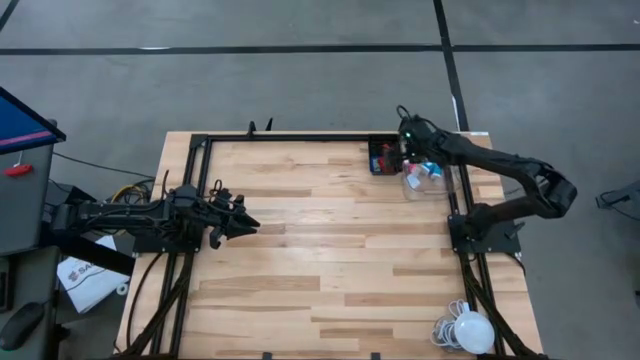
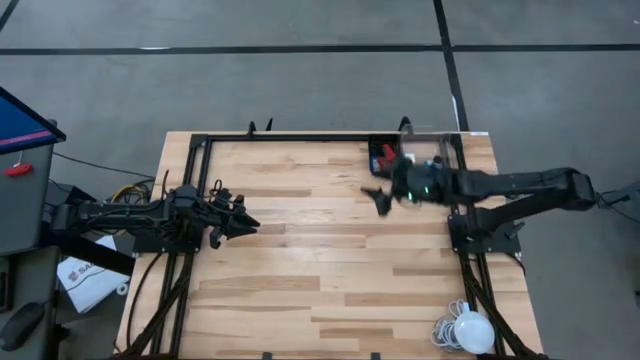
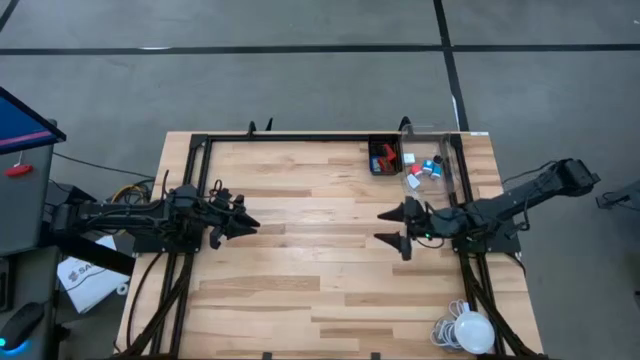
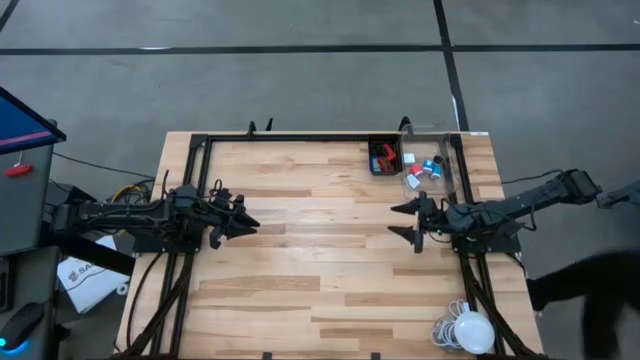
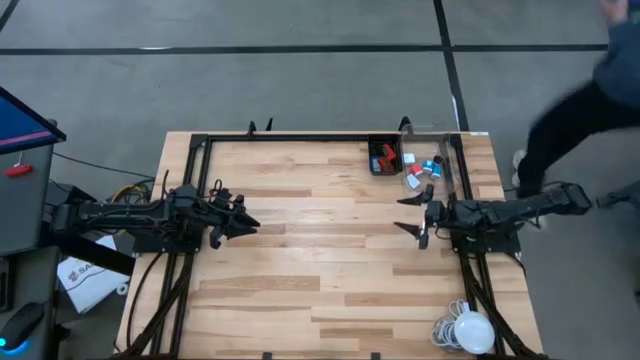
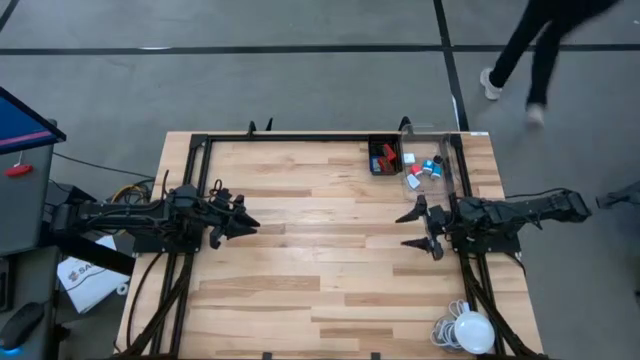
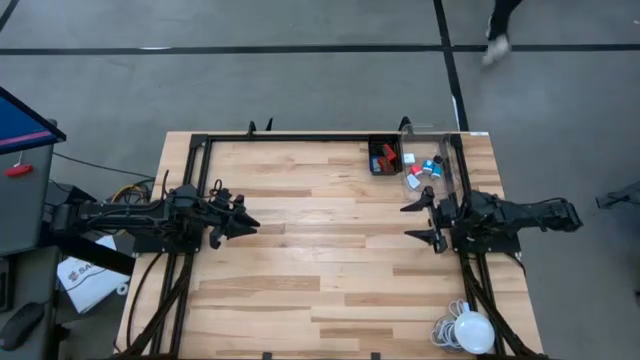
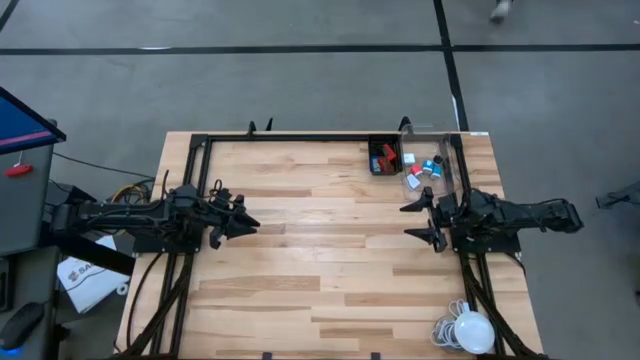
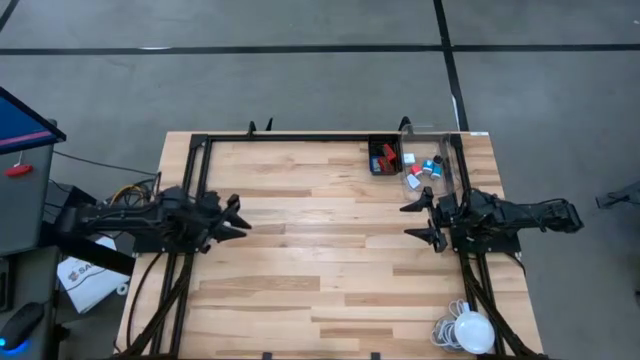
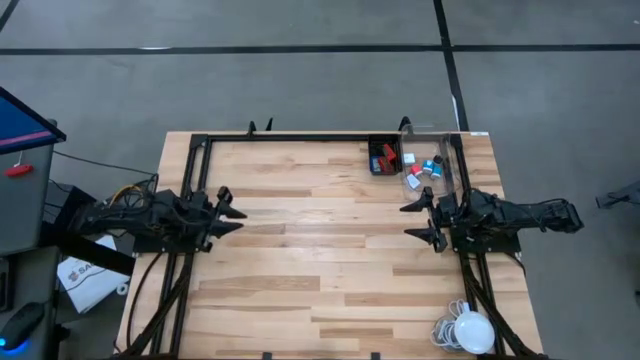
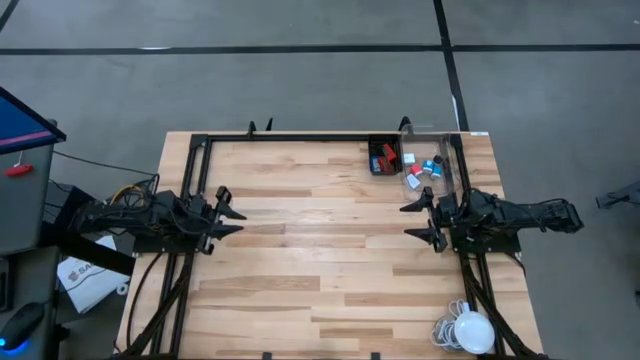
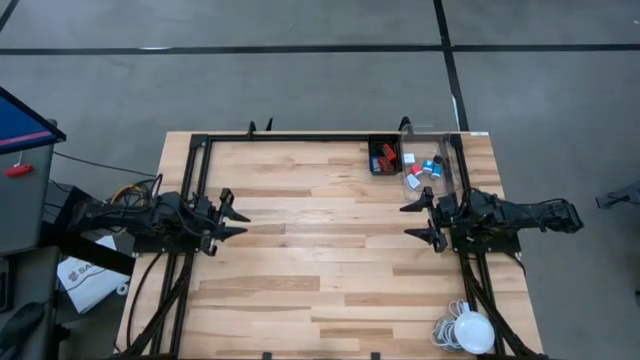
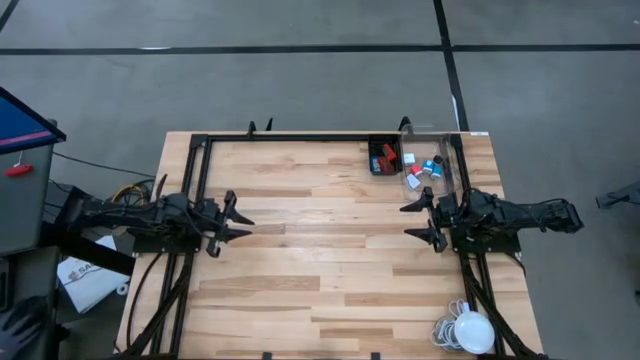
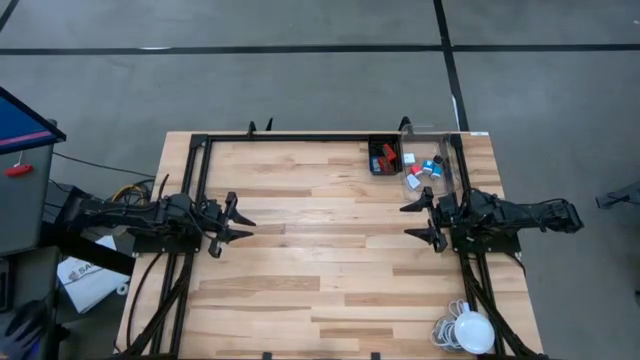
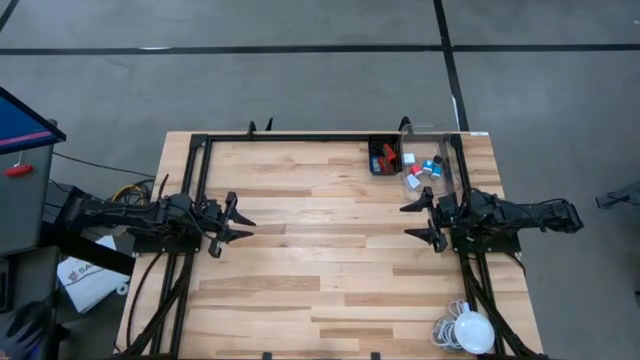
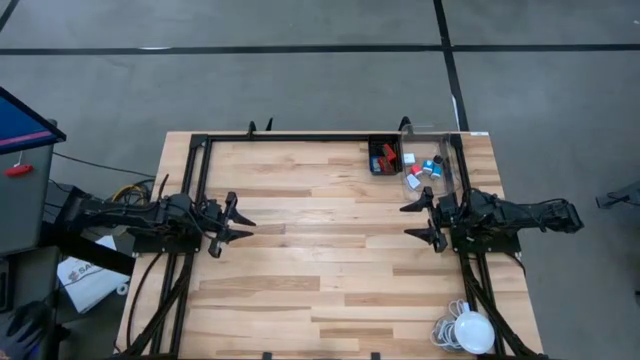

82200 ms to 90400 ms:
Task: Pick & Place Office items
Return to Home Position

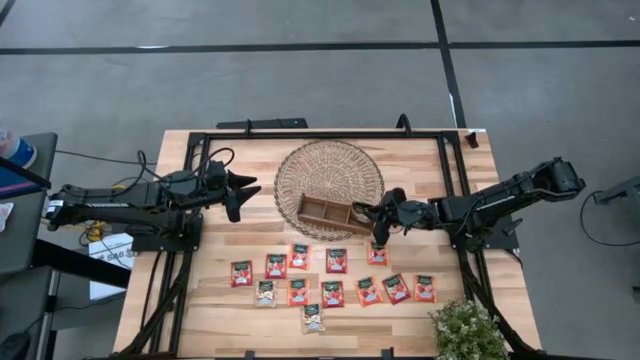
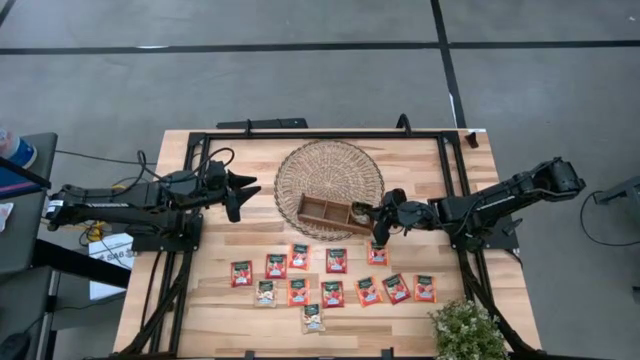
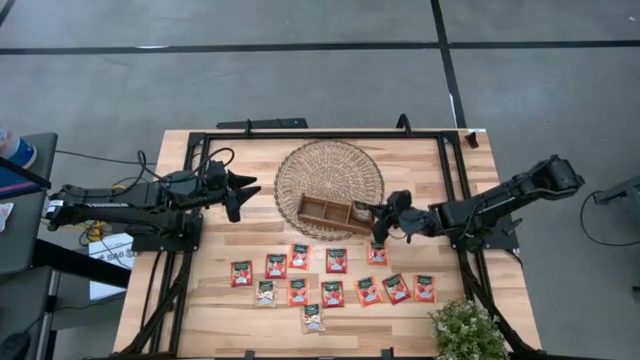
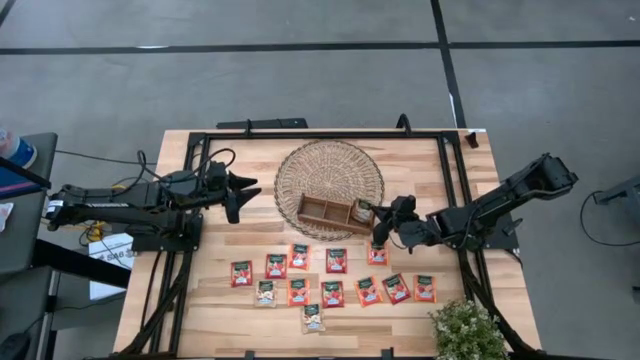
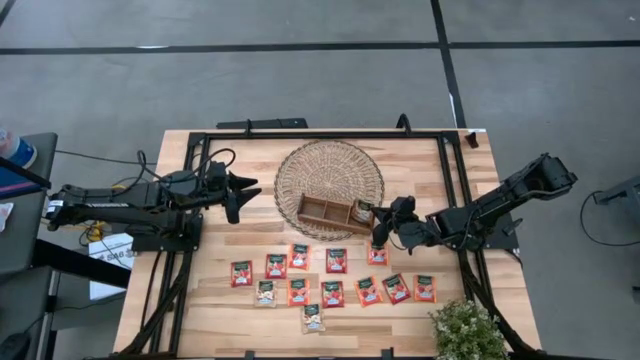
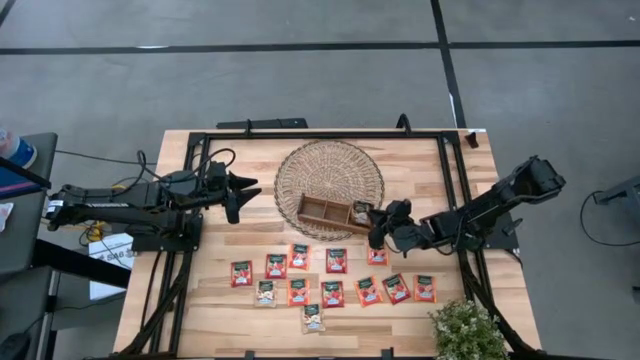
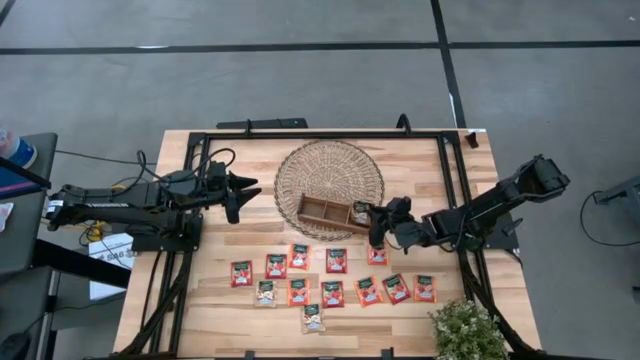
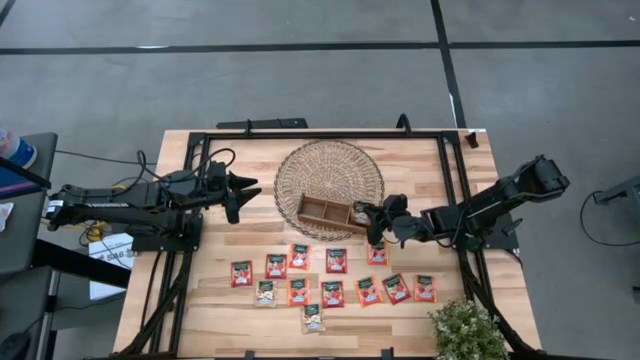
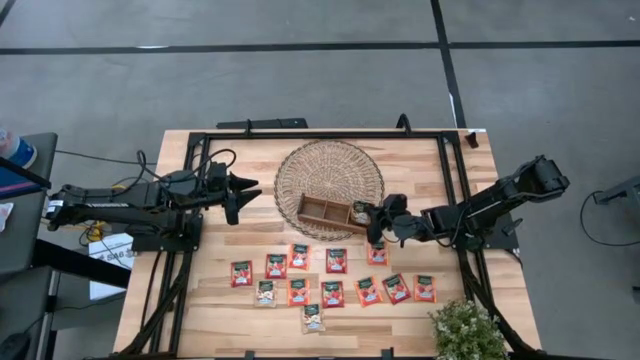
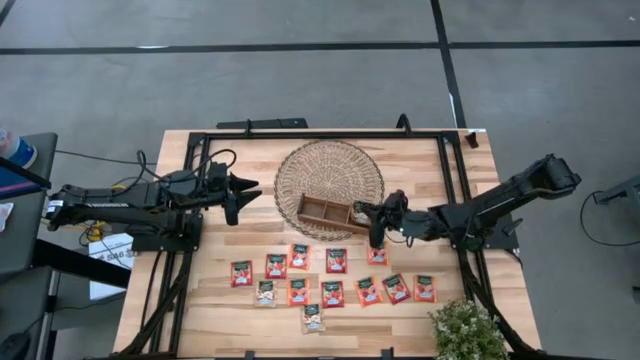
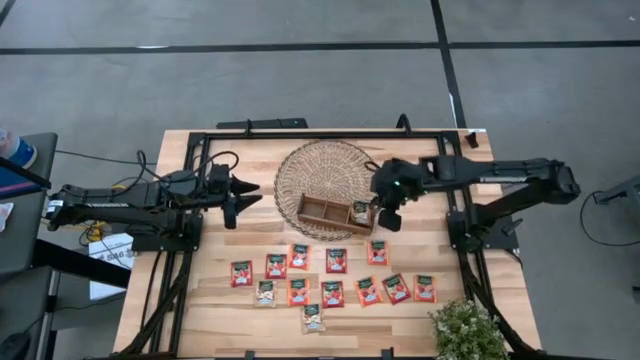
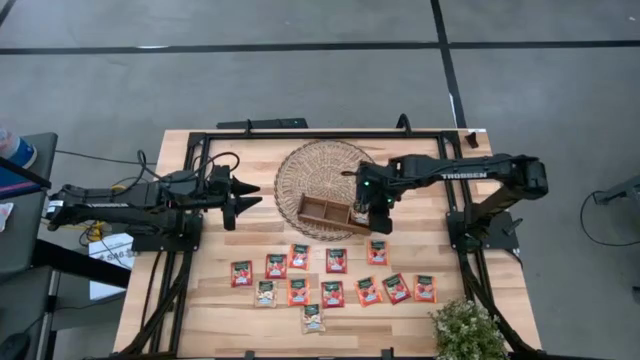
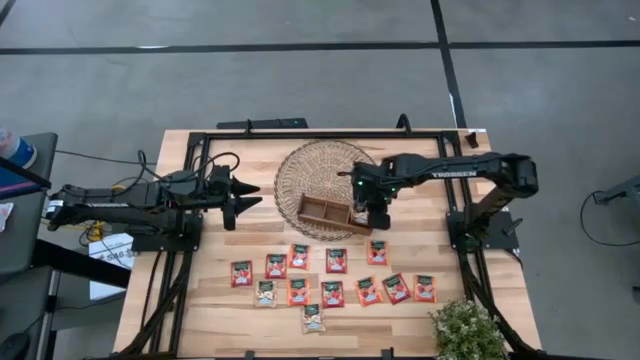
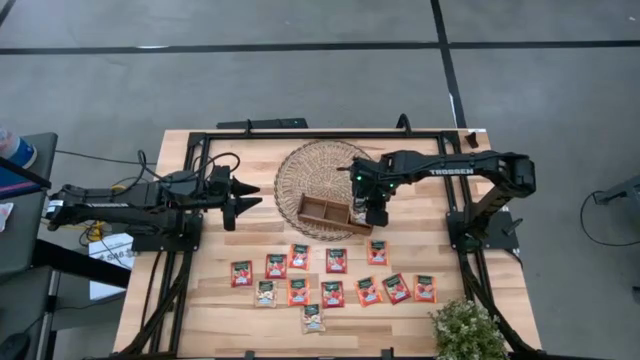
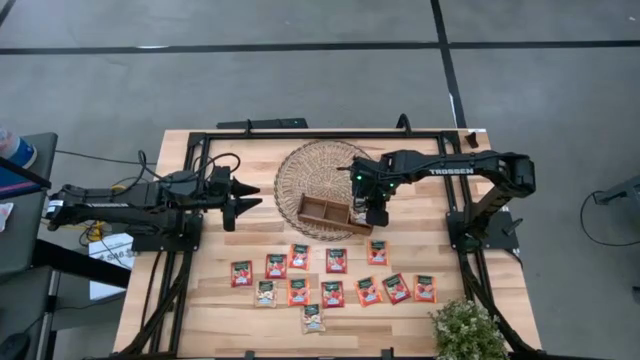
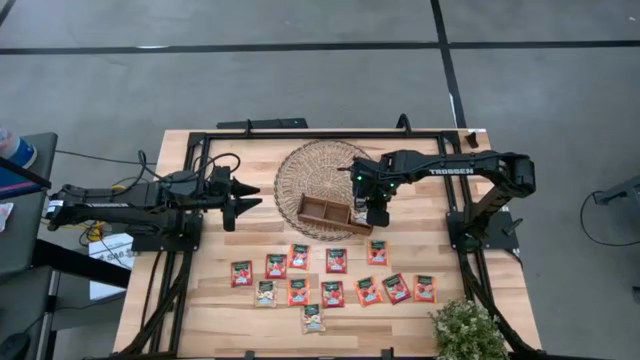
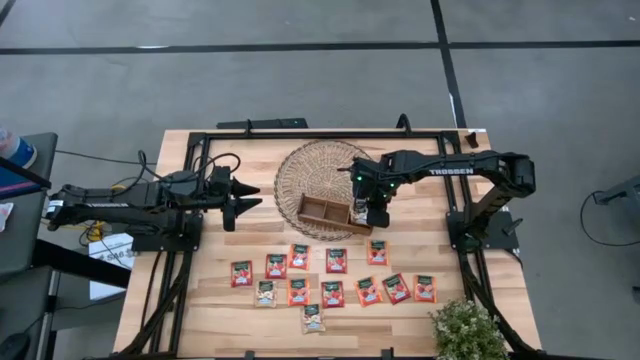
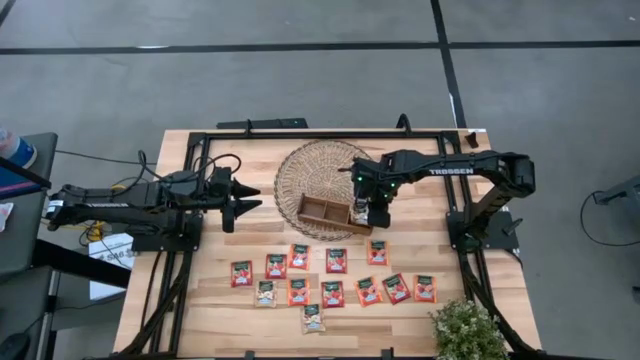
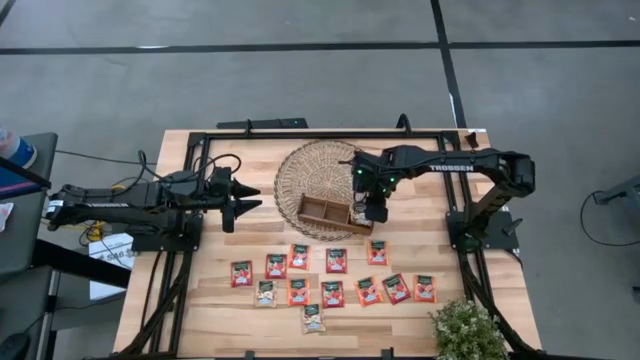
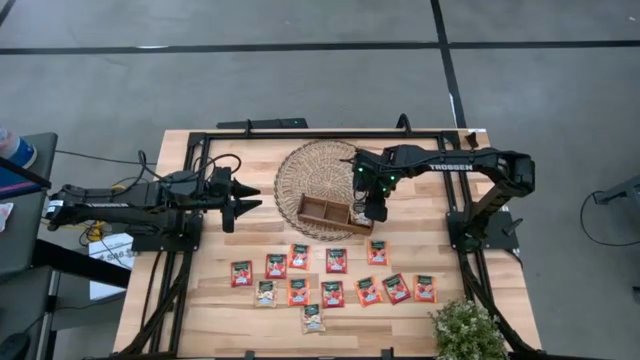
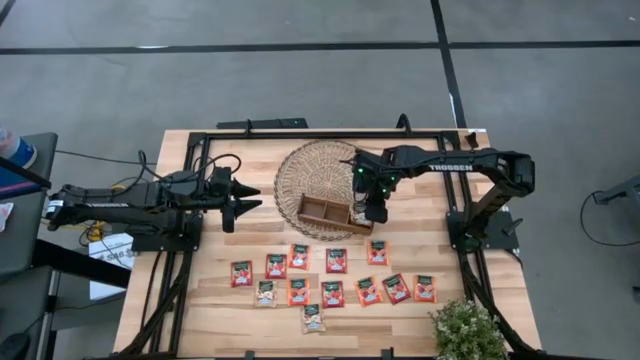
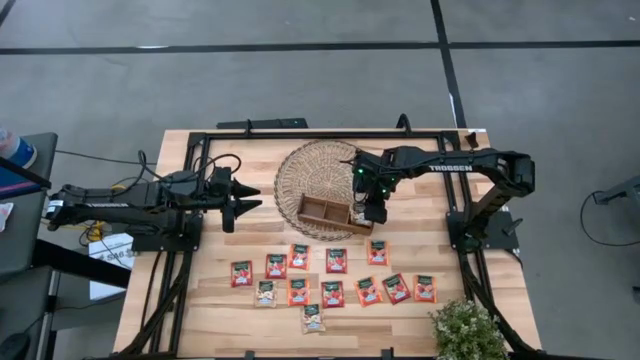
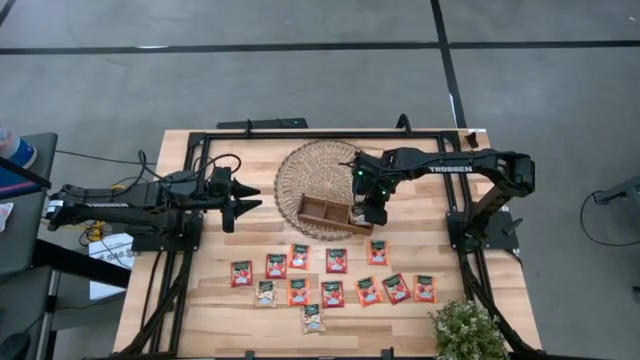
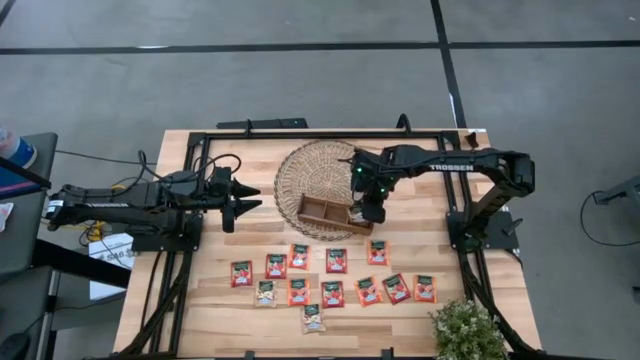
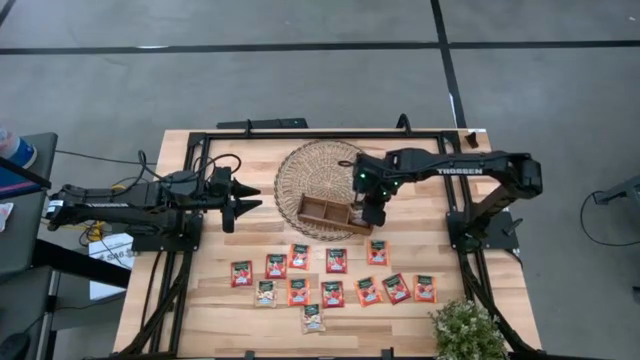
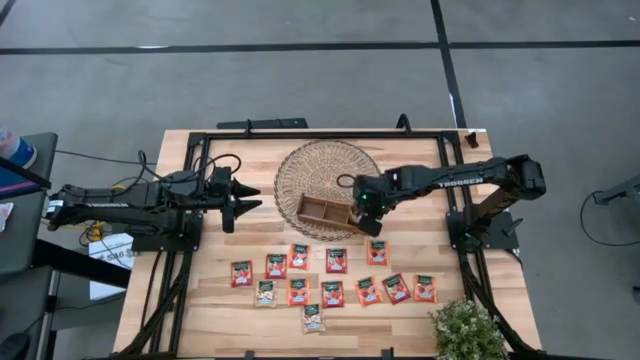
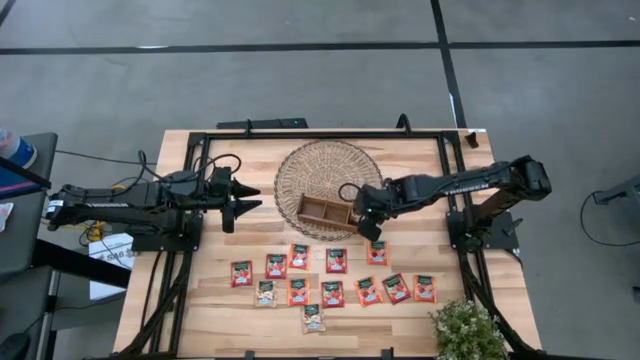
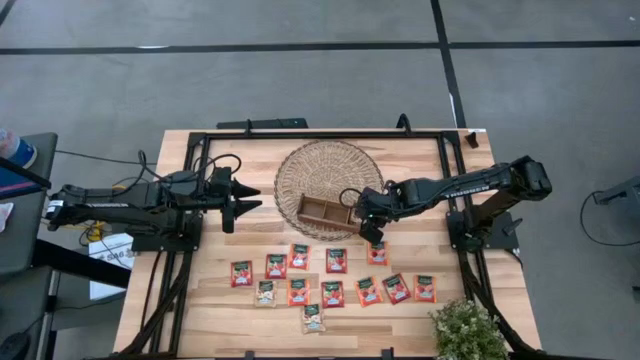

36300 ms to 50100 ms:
Task: Pick & Place Tea
Put the brown tea bag into the right section of the wooden organizer
